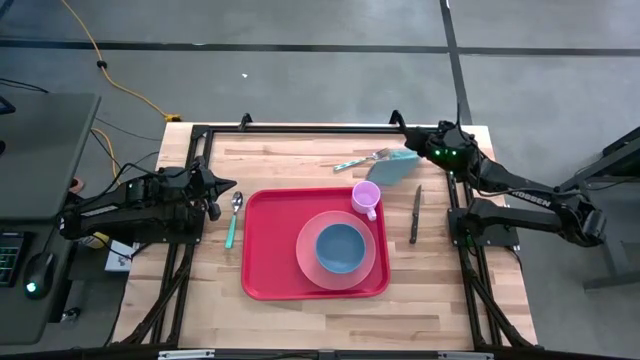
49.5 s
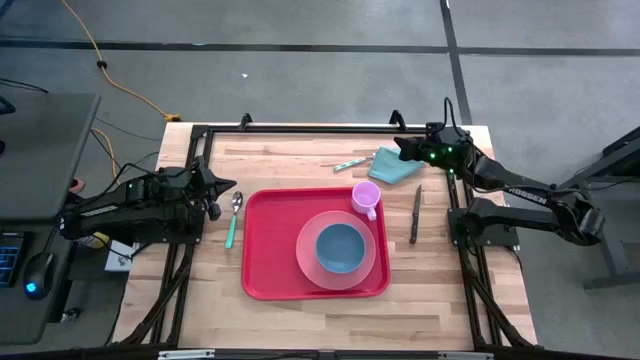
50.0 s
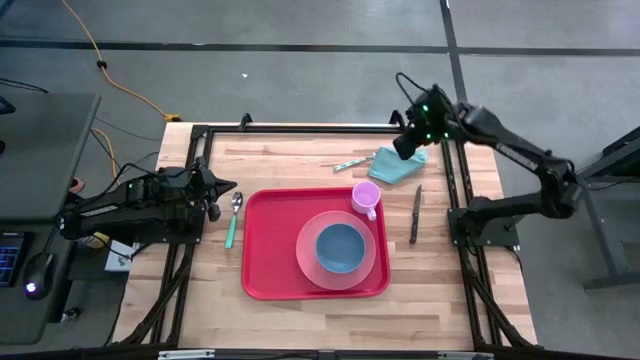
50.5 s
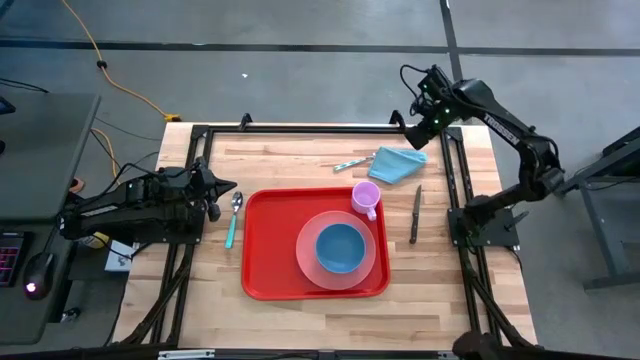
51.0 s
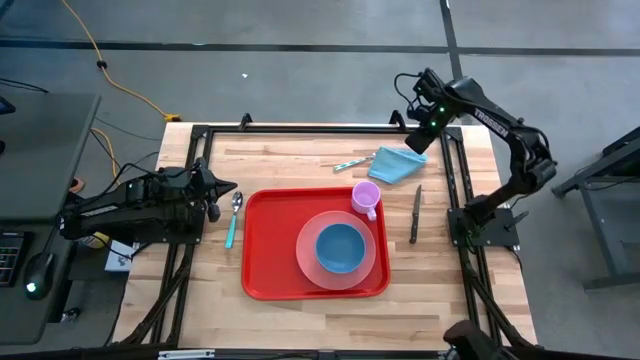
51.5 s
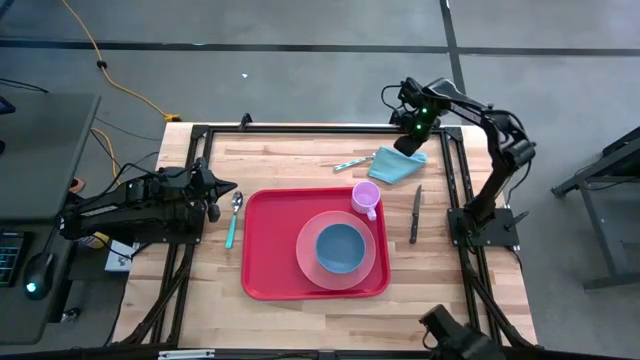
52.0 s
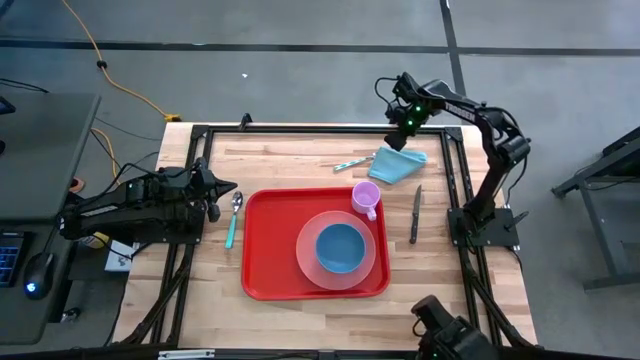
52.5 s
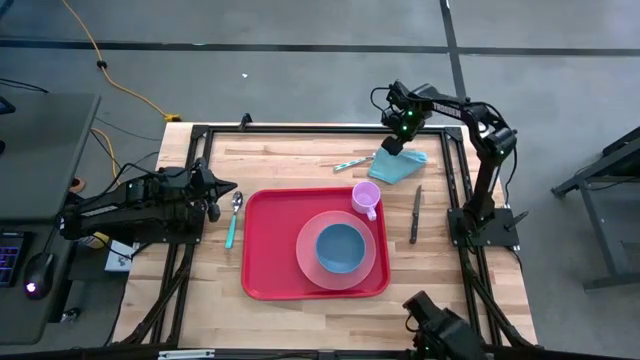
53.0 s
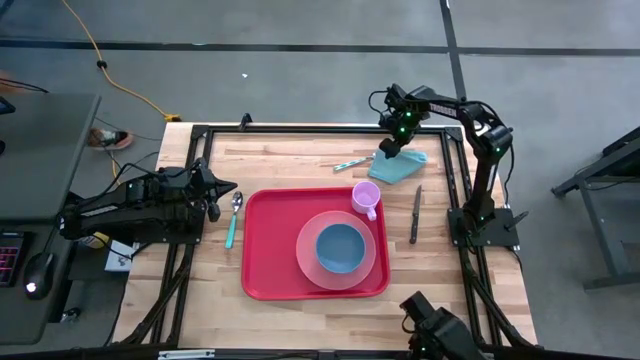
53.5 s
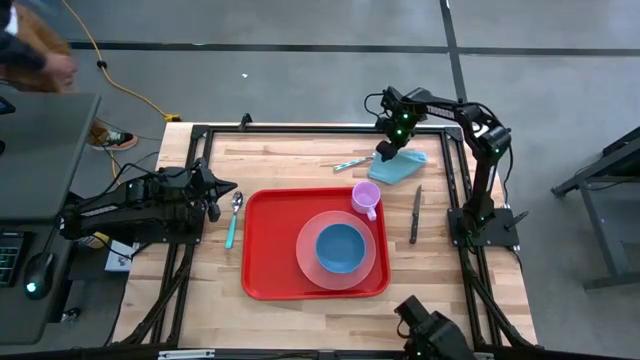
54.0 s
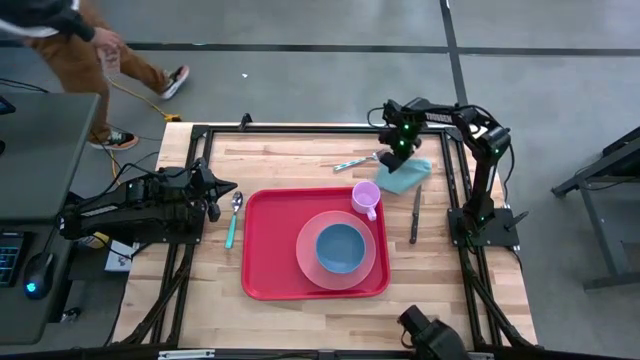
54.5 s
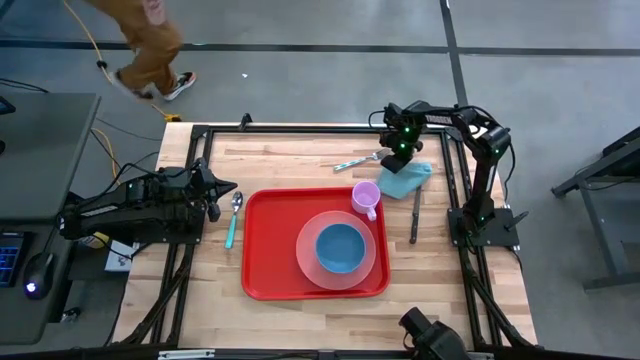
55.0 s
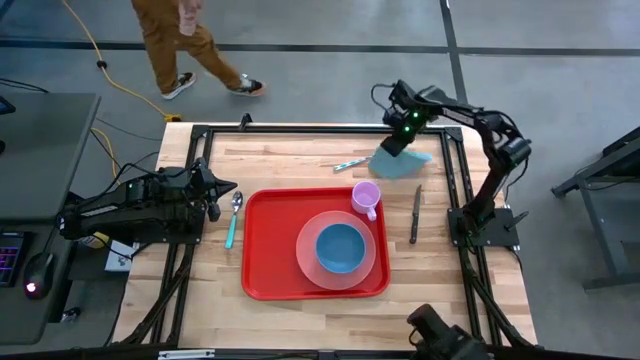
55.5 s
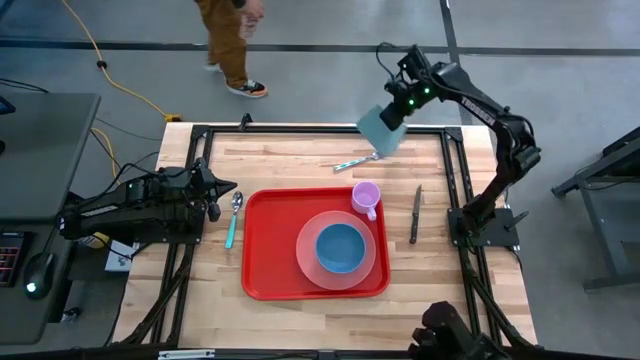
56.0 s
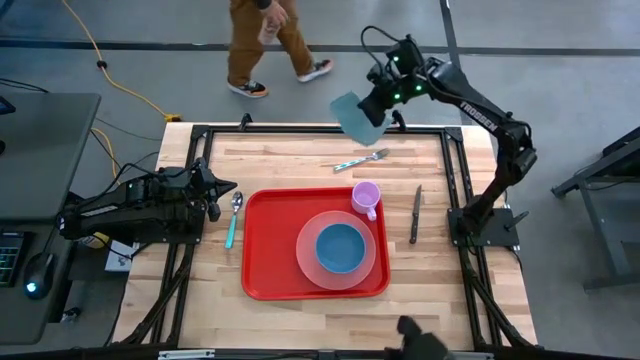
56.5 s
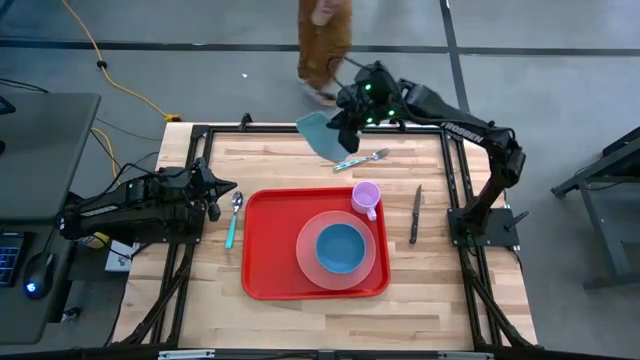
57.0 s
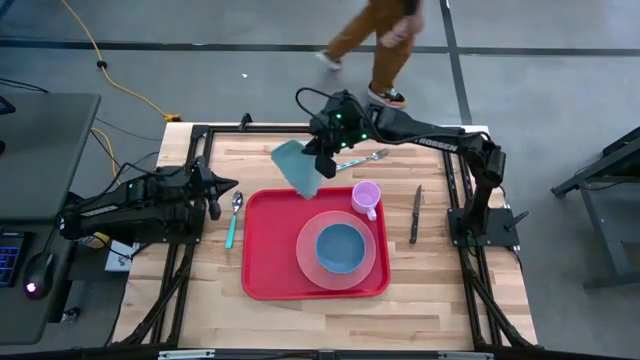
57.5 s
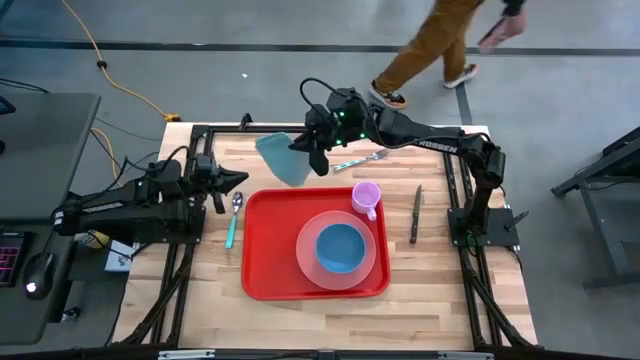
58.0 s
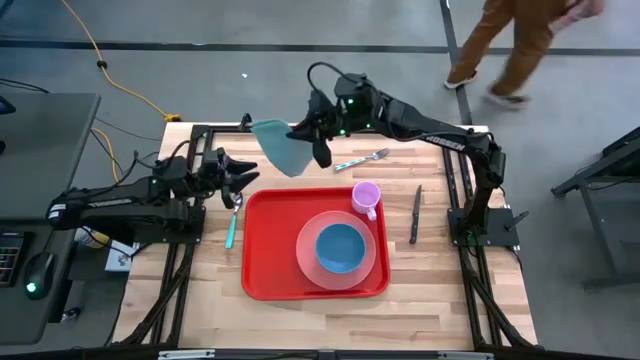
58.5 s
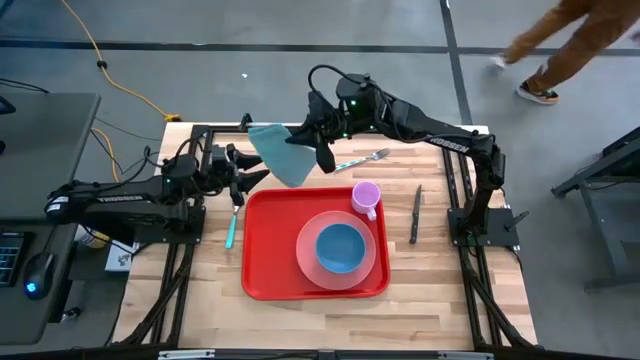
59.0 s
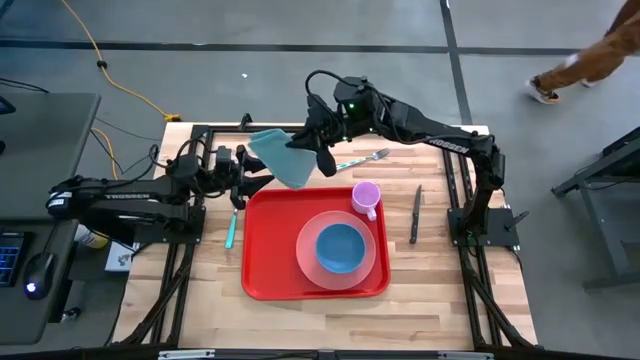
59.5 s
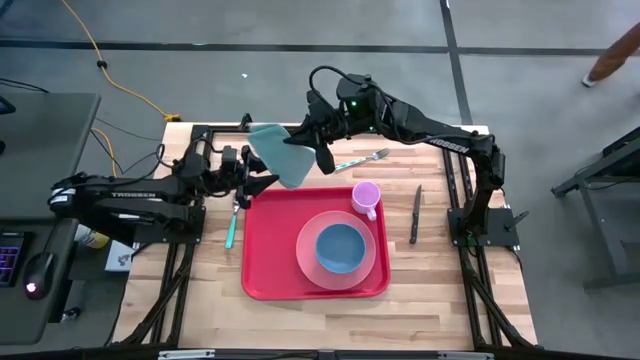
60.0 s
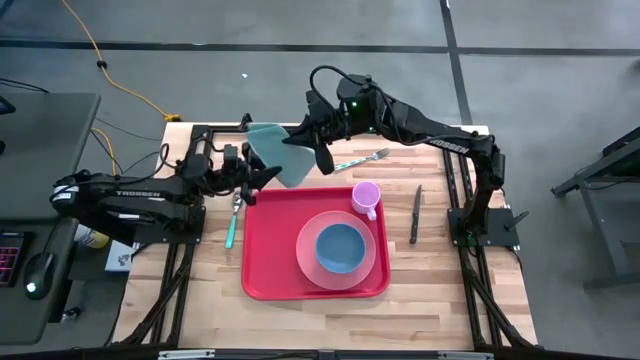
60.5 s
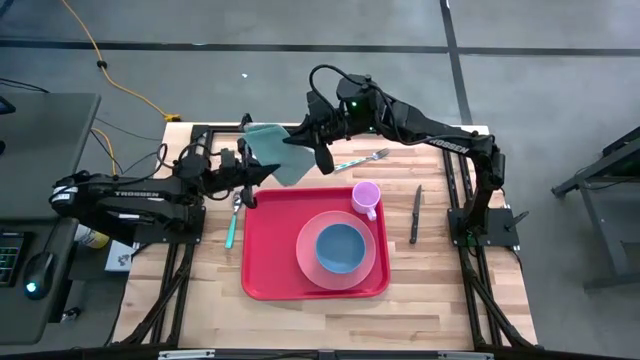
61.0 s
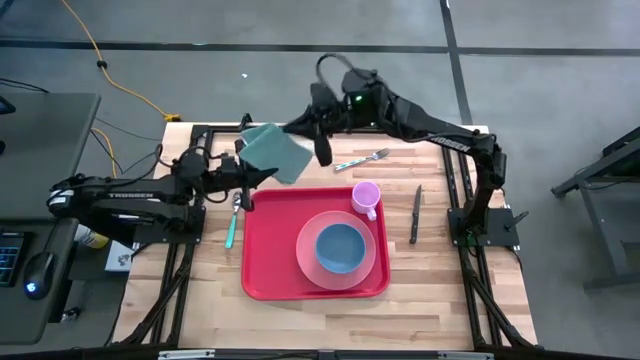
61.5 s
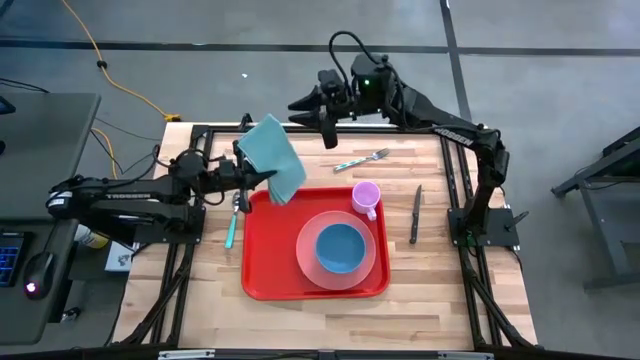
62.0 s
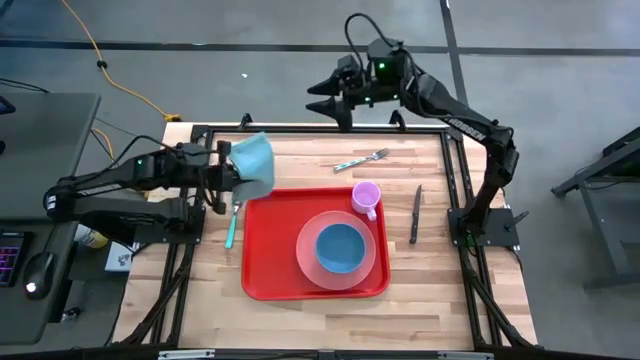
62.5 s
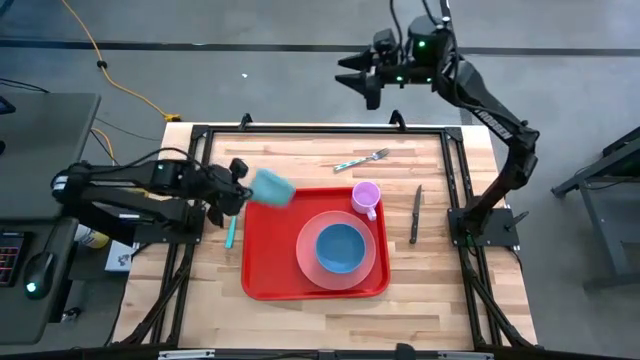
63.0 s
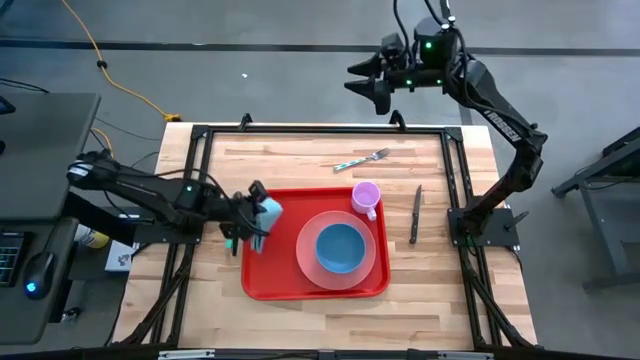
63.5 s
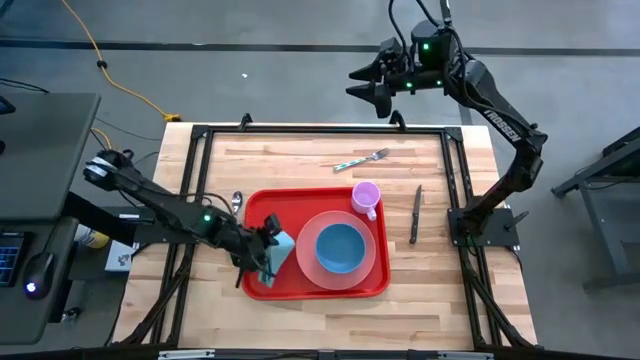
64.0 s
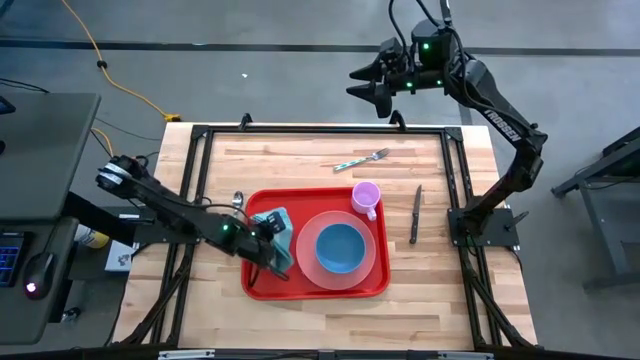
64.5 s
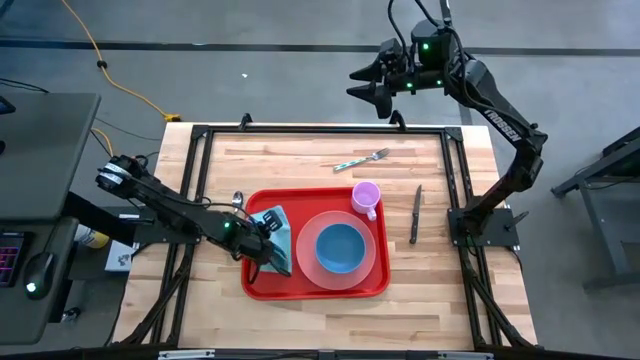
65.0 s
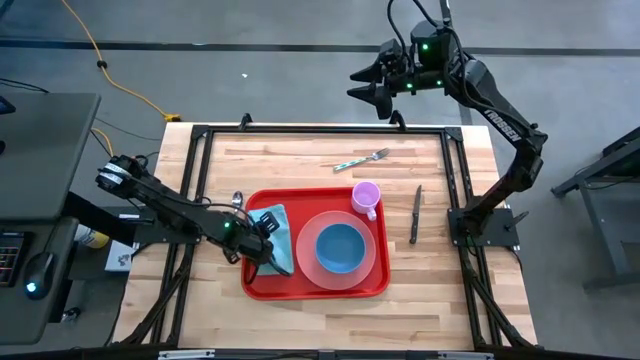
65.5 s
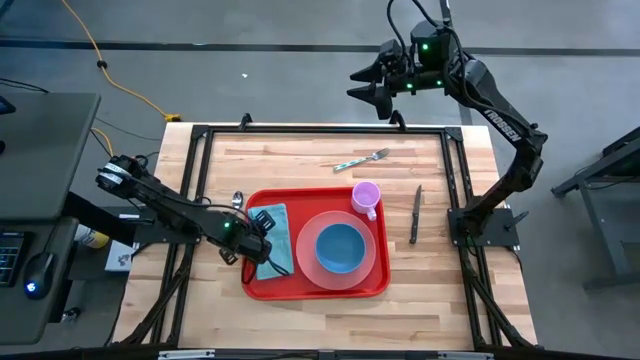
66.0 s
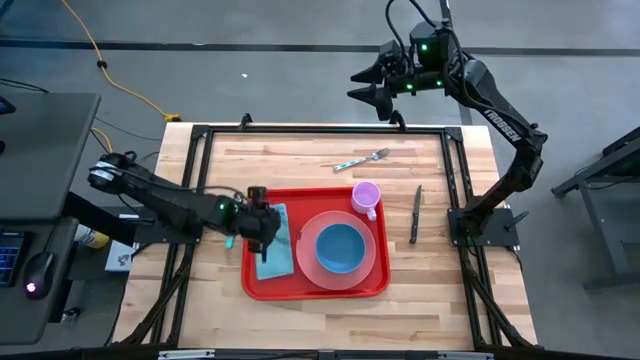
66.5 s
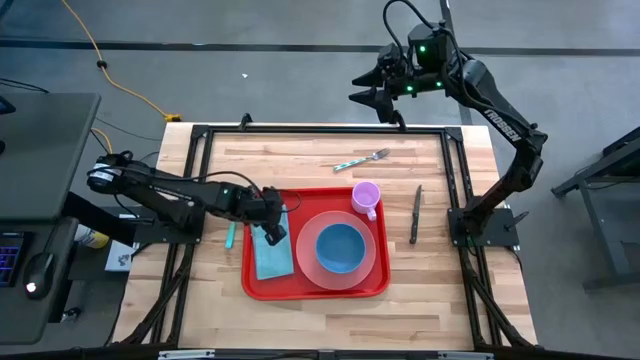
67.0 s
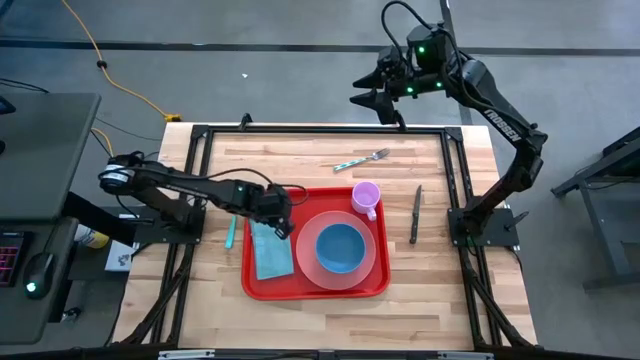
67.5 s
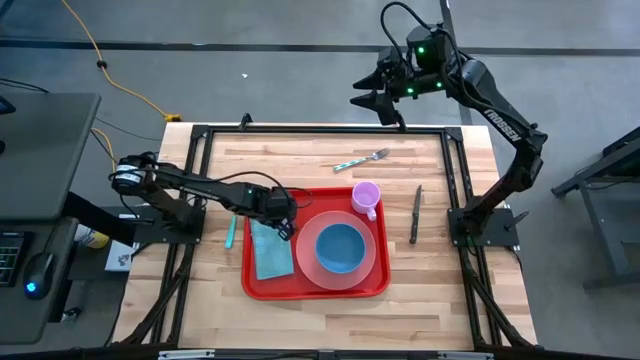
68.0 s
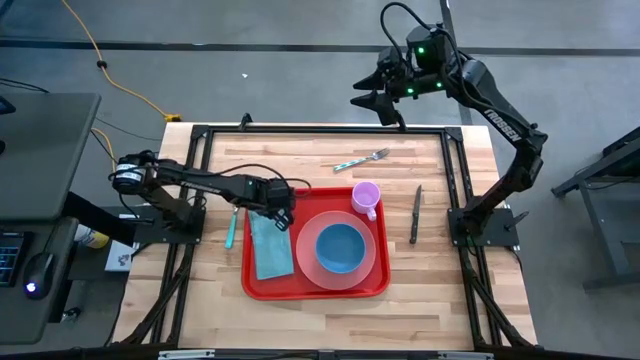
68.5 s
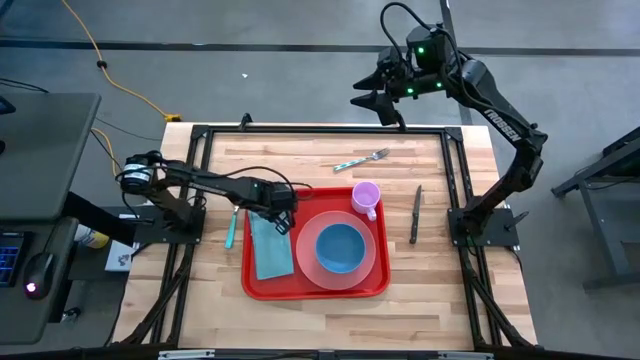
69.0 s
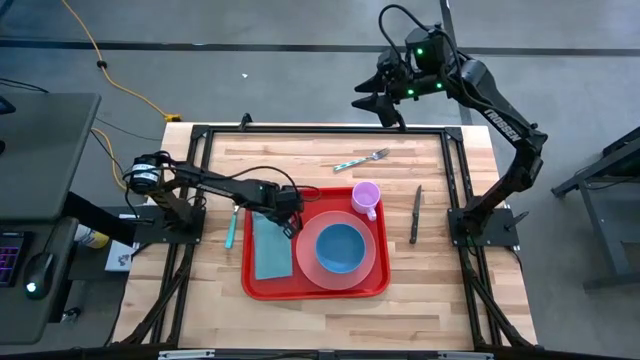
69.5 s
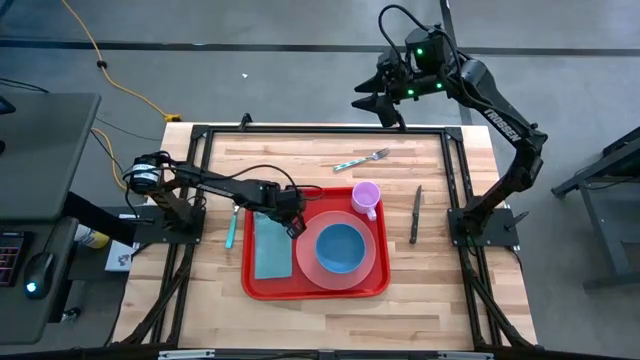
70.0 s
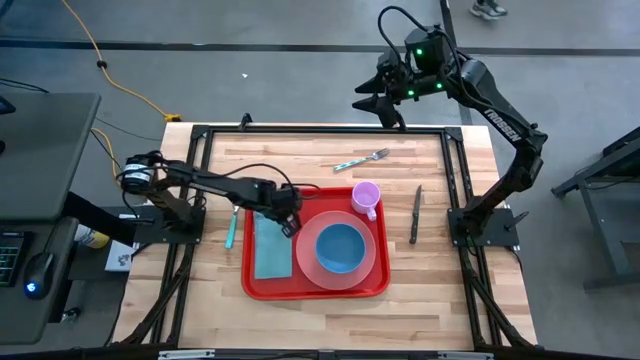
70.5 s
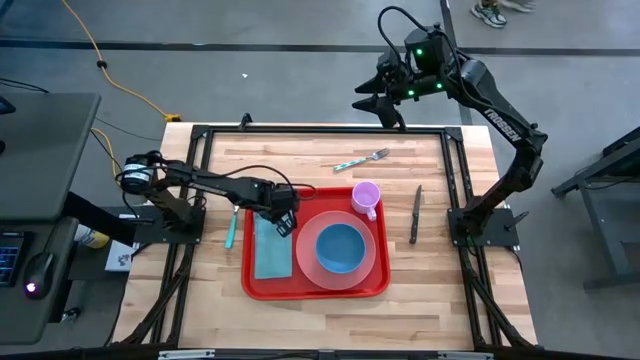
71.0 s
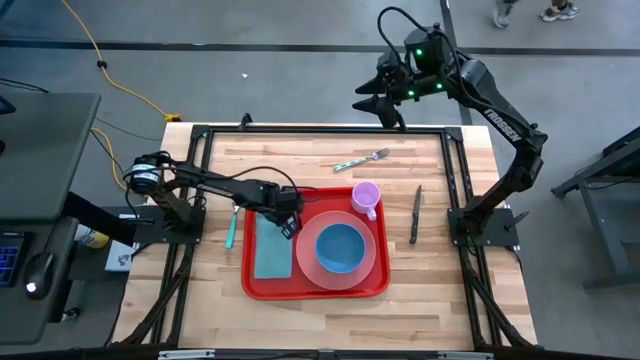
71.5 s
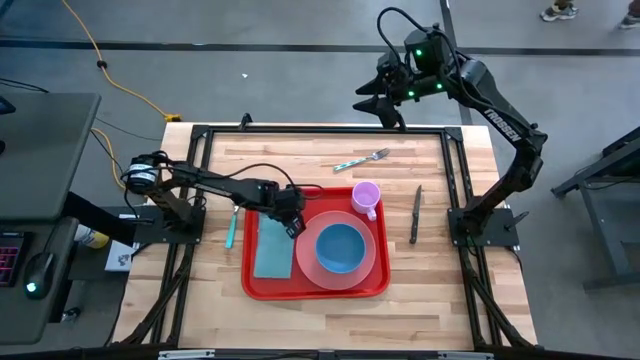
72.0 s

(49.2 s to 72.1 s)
Task: Set up tray
Put the blue napkin on the red serving tray to the left of the pink plate
